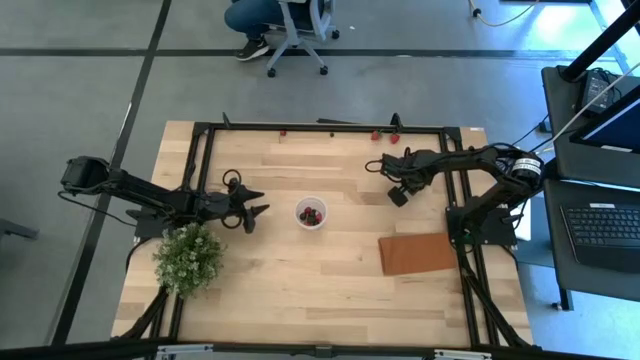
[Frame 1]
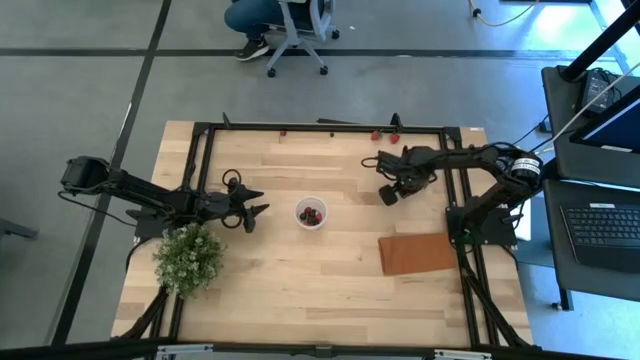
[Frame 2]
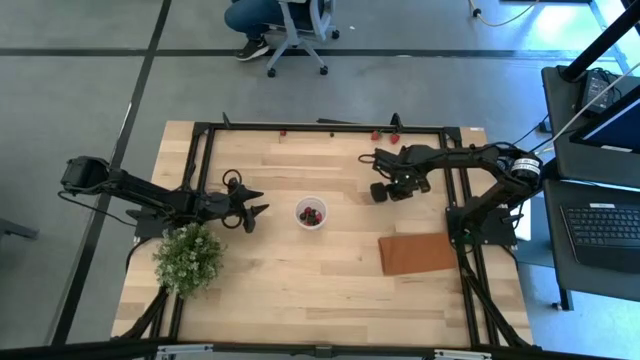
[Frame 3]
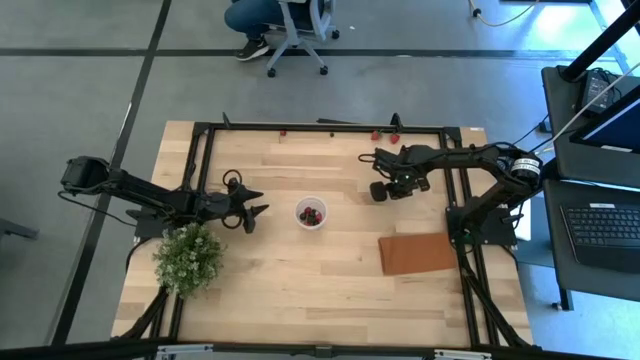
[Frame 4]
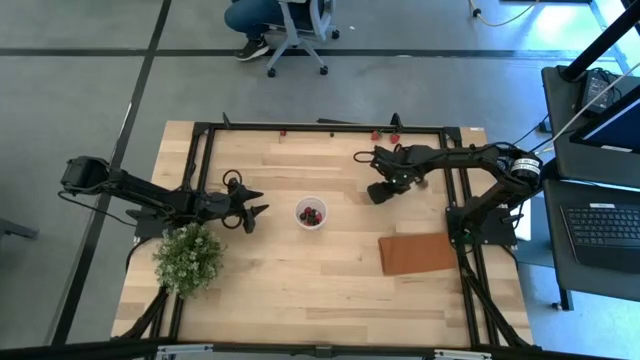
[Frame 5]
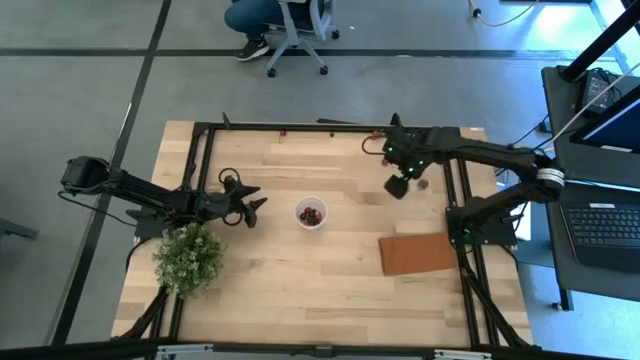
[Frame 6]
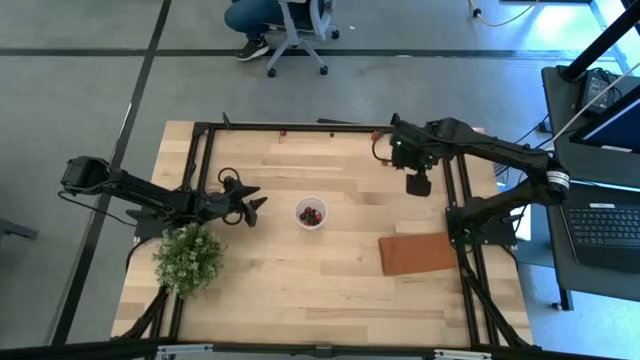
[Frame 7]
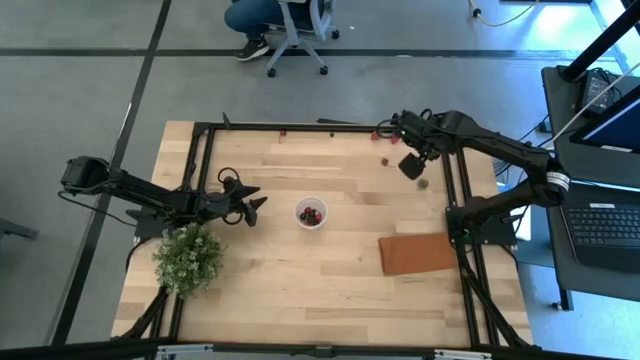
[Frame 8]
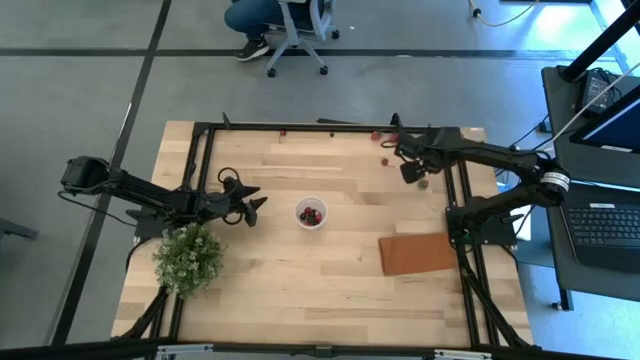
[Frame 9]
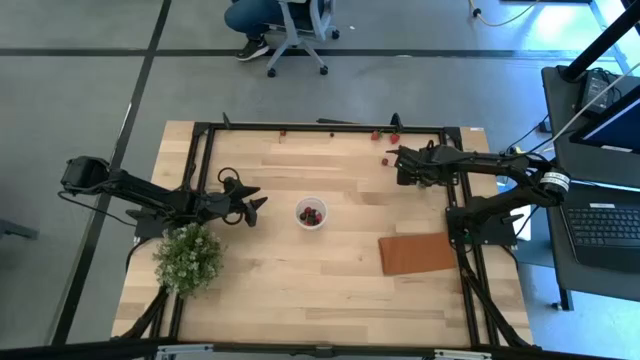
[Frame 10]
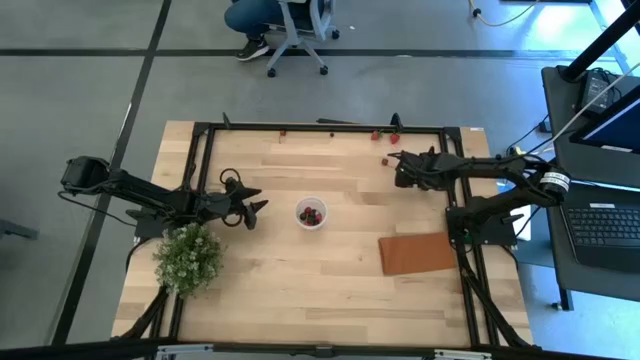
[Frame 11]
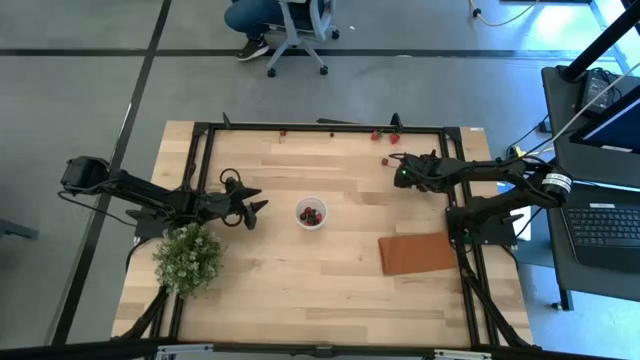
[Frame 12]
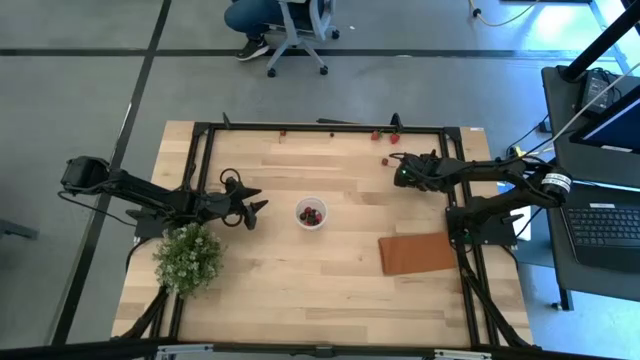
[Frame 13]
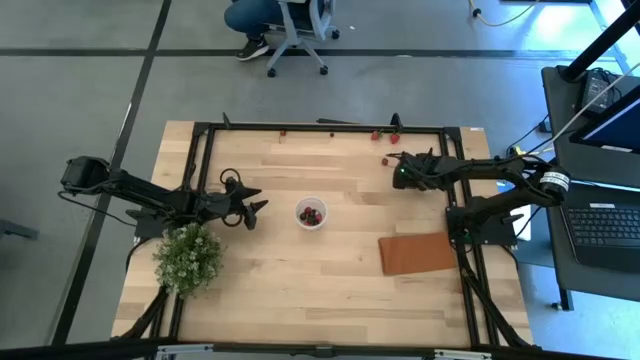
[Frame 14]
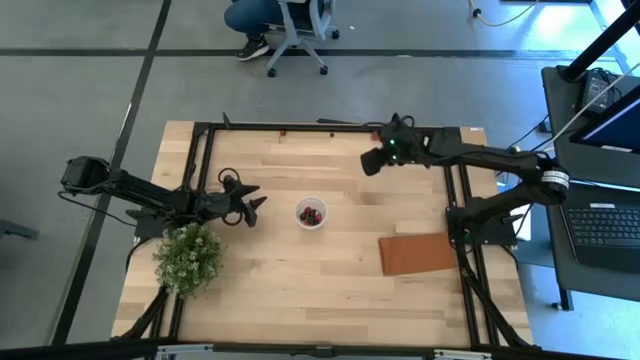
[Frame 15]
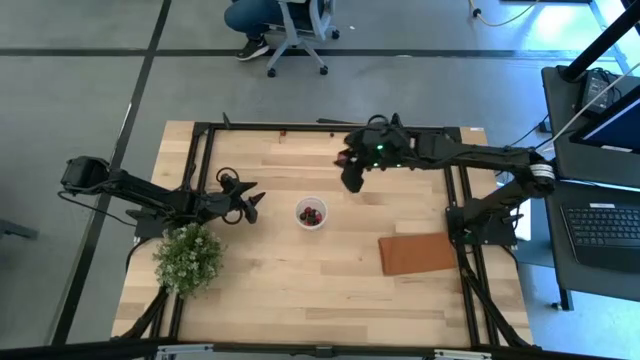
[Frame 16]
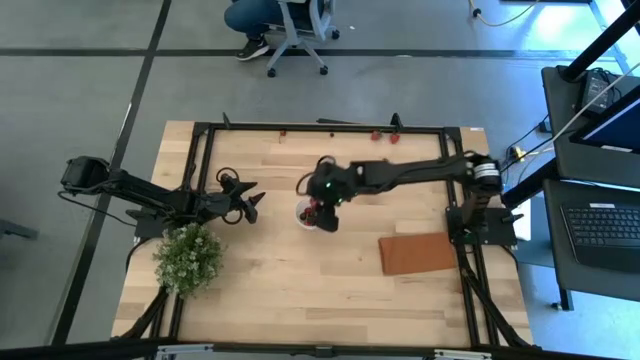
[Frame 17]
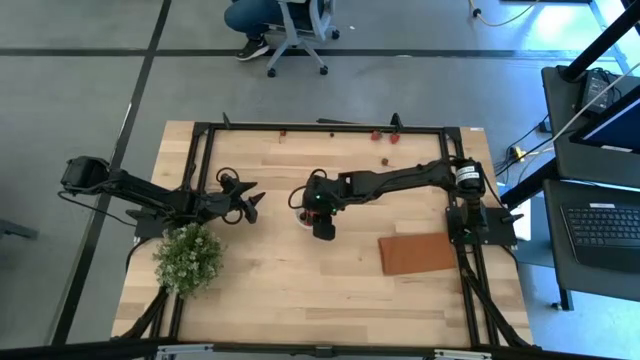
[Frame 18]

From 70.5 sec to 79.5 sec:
Task: Pick and placing Produce into tupperware
Put the bottom strawberry into the bin

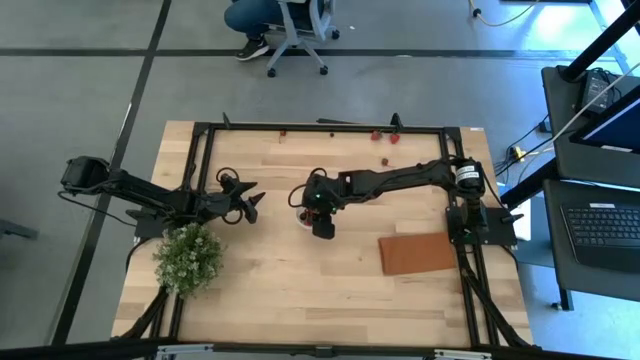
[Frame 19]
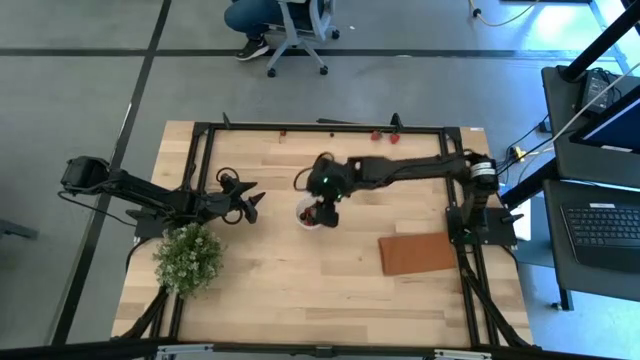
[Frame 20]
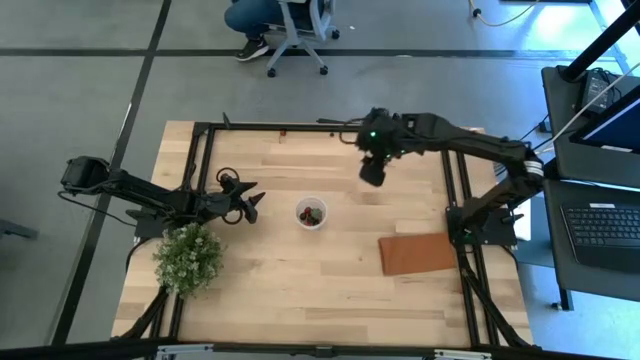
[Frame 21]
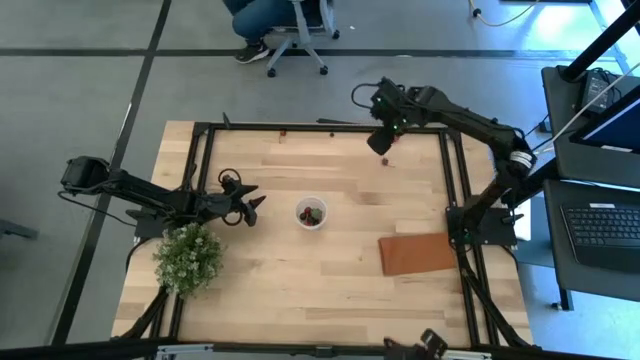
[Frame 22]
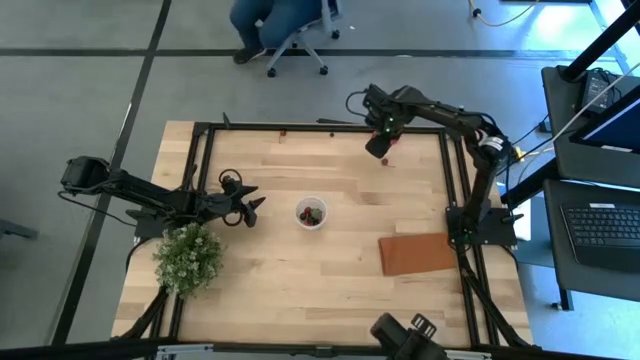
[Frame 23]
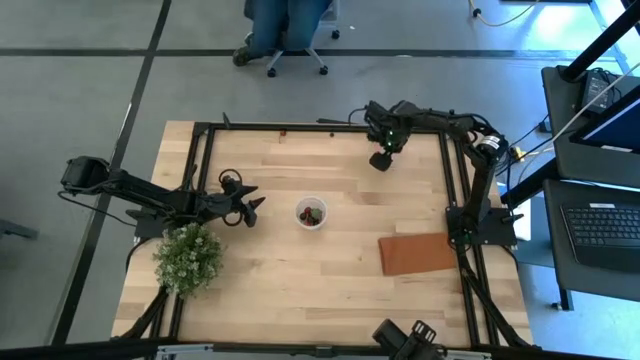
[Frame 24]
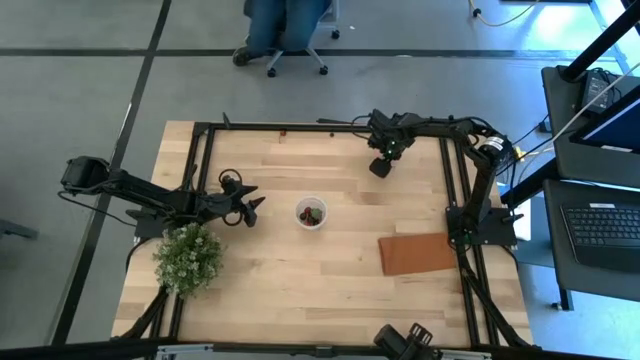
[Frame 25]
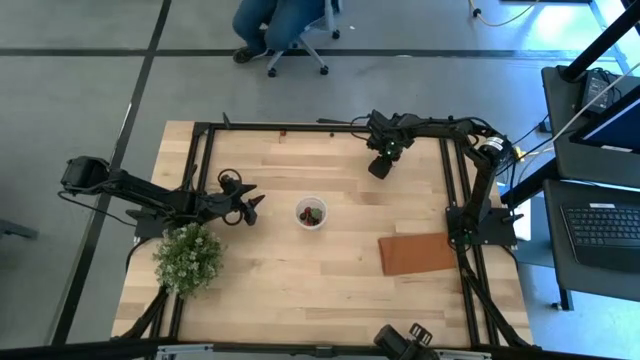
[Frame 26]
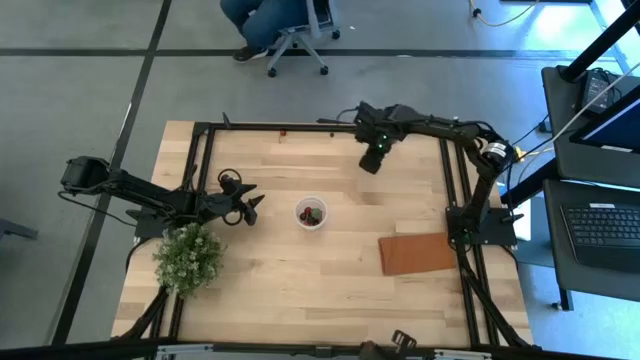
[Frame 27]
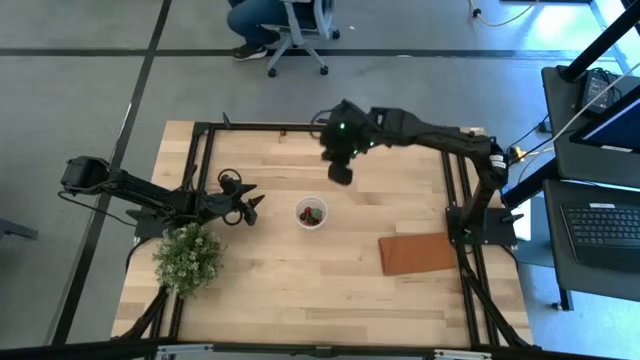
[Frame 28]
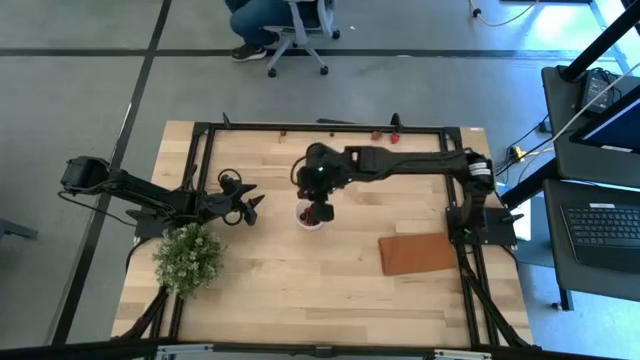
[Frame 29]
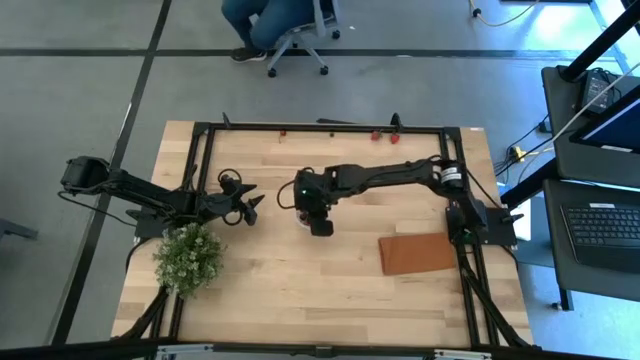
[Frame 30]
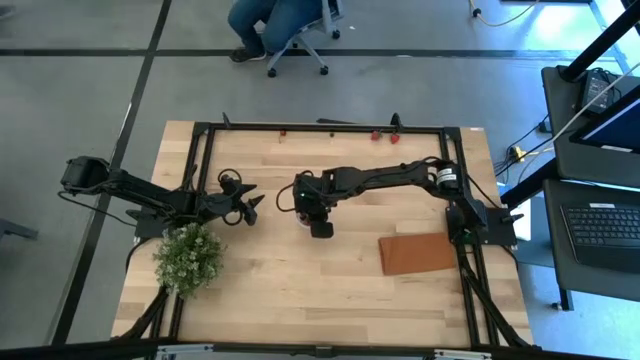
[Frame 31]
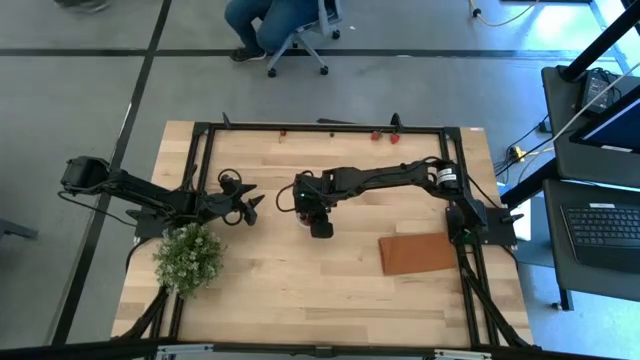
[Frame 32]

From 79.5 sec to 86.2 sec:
Put the bottom red cherry into the bin

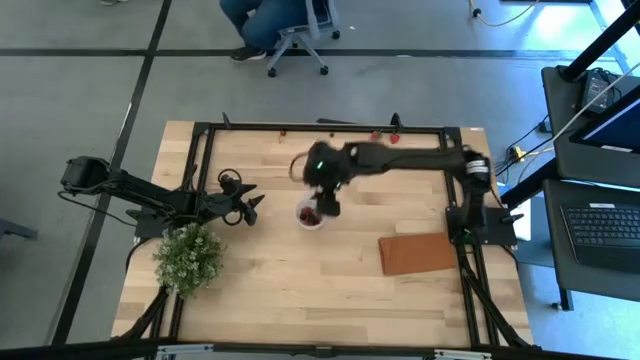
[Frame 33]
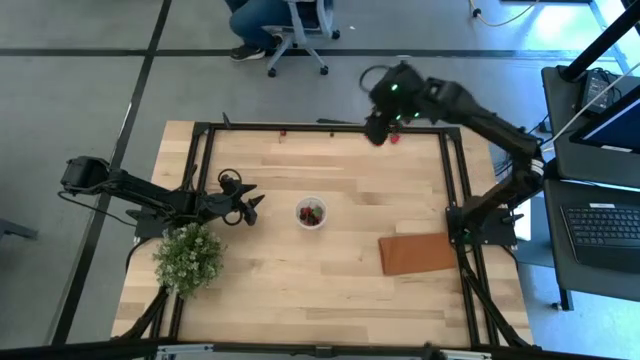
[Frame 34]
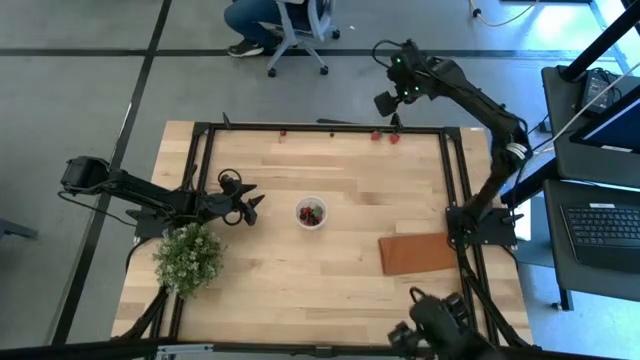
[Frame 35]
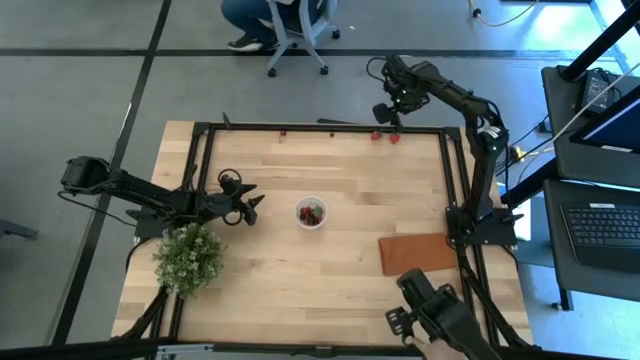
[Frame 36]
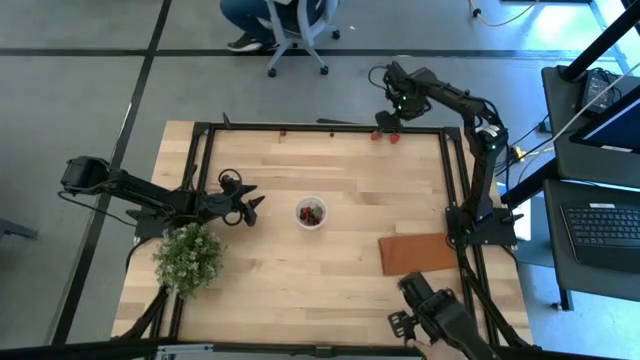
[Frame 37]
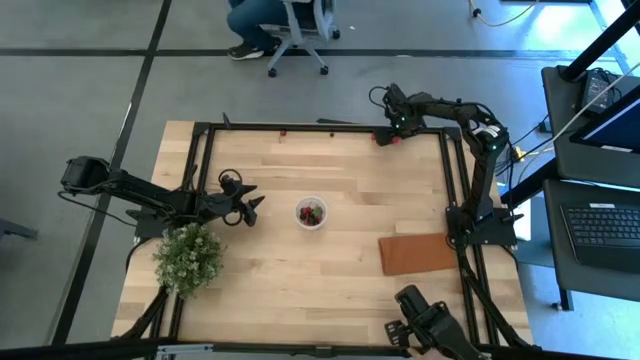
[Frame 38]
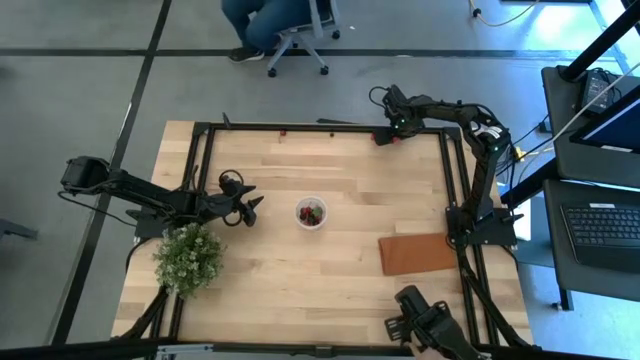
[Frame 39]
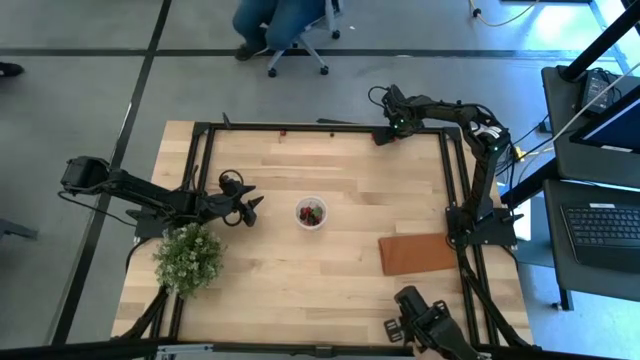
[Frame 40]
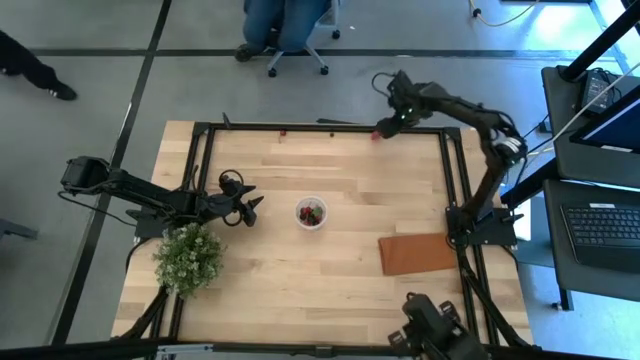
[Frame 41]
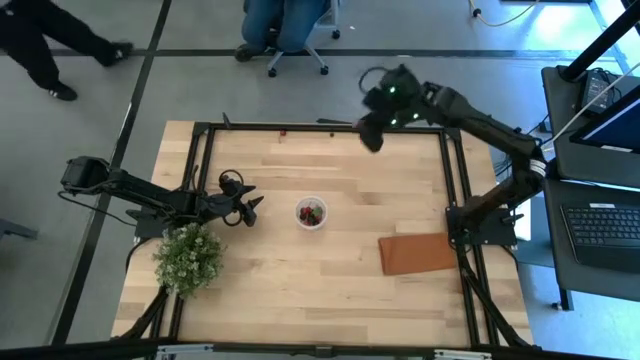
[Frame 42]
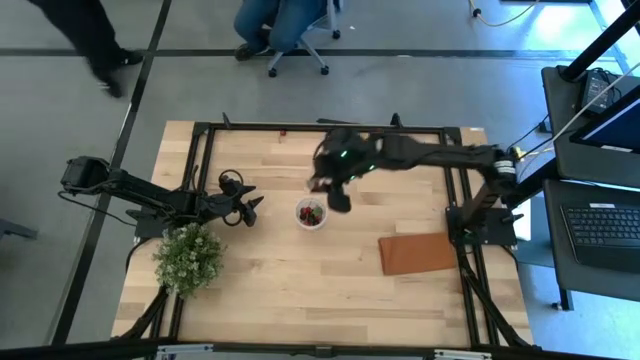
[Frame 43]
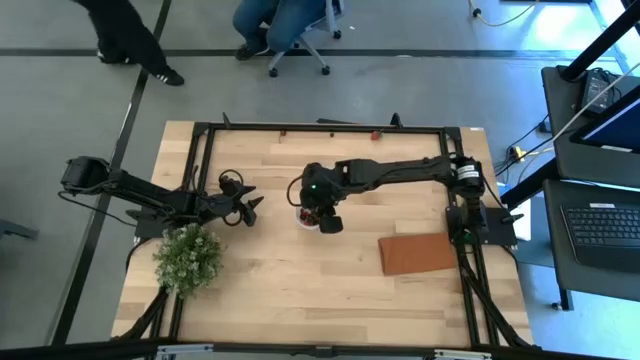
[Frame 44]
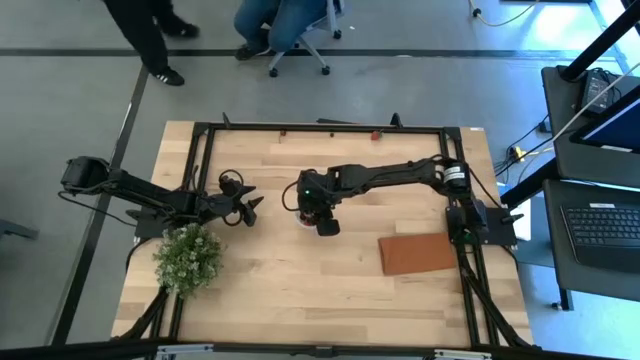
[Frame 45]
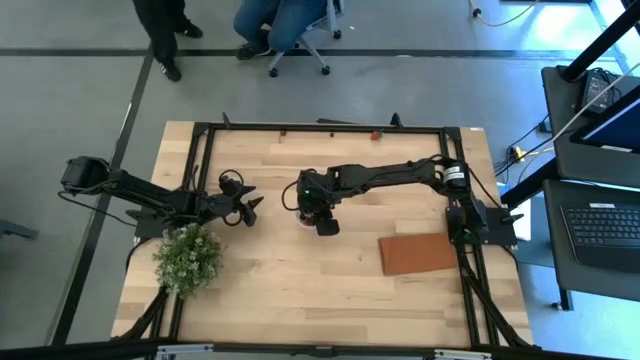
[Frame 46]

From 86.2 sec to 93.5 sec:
Put the right strawberry into the bin
